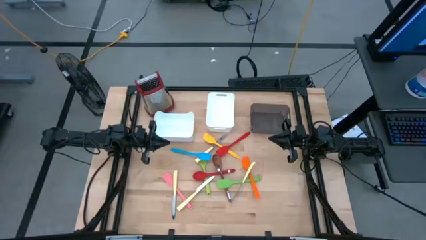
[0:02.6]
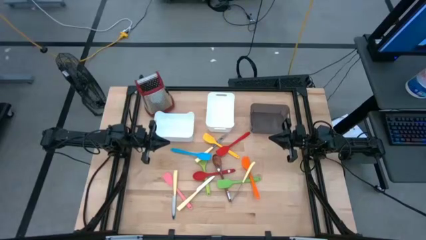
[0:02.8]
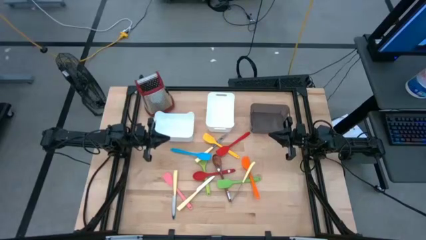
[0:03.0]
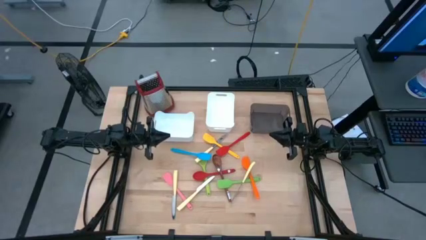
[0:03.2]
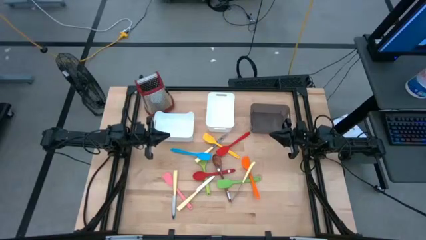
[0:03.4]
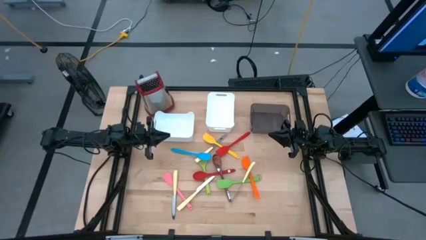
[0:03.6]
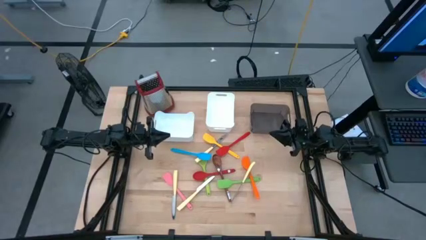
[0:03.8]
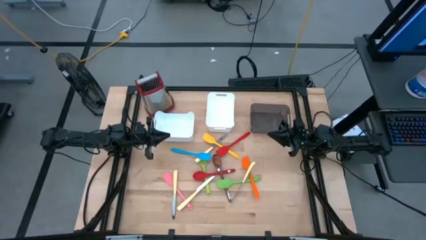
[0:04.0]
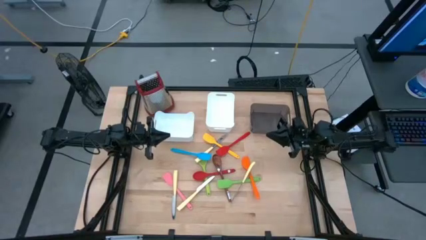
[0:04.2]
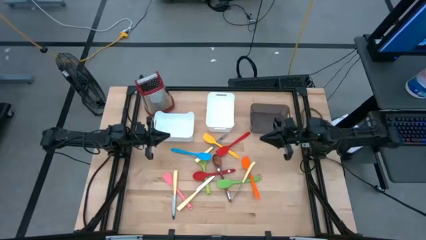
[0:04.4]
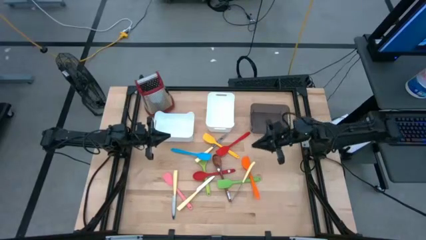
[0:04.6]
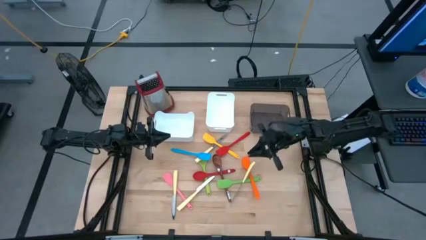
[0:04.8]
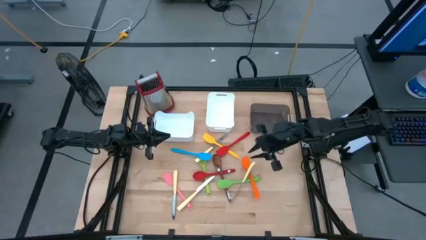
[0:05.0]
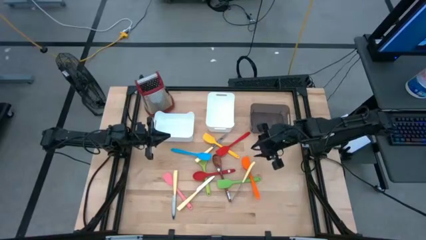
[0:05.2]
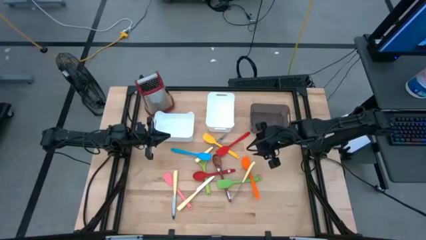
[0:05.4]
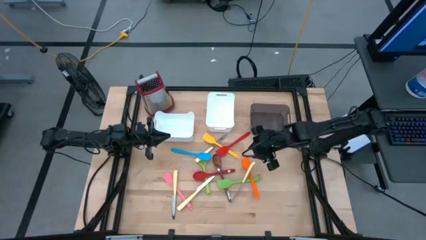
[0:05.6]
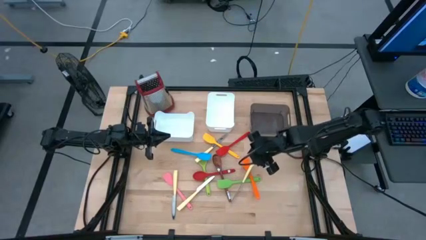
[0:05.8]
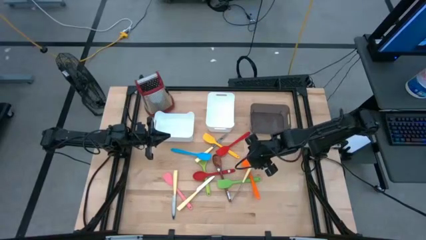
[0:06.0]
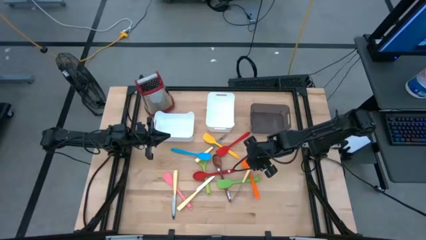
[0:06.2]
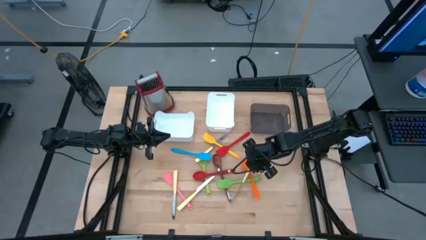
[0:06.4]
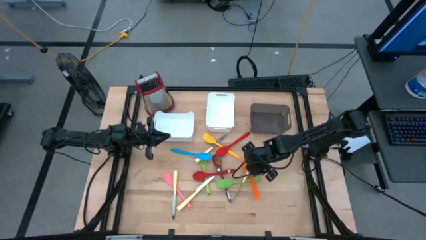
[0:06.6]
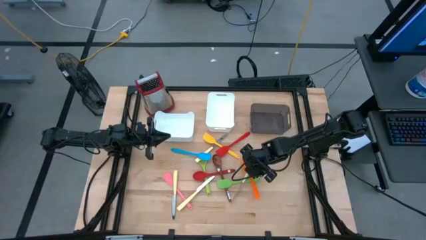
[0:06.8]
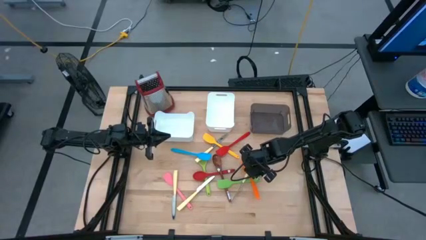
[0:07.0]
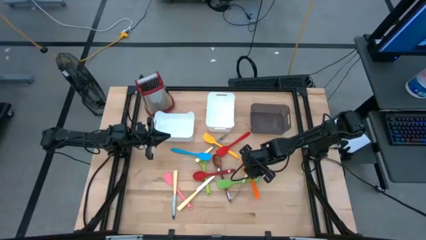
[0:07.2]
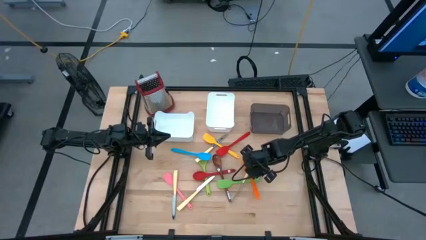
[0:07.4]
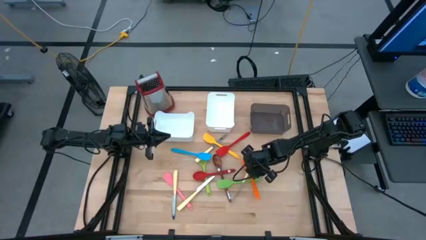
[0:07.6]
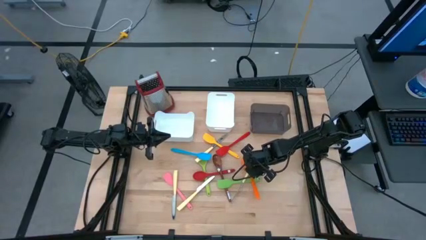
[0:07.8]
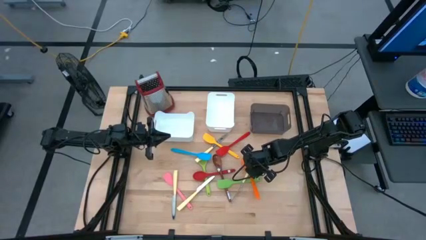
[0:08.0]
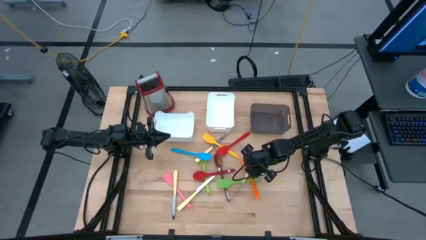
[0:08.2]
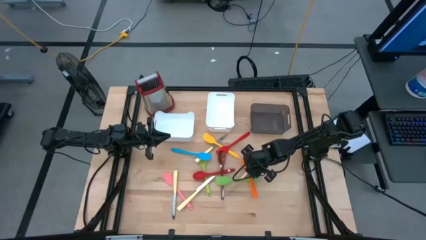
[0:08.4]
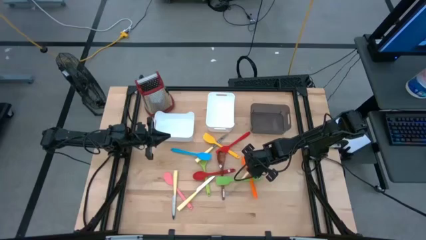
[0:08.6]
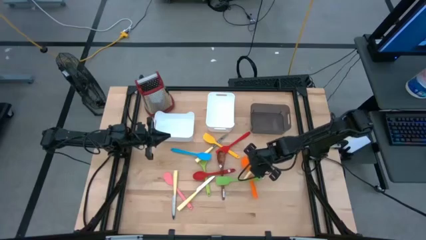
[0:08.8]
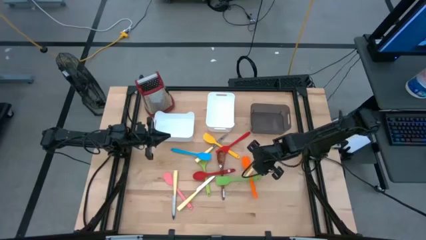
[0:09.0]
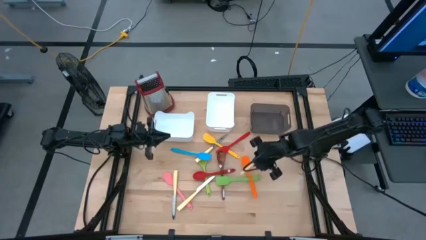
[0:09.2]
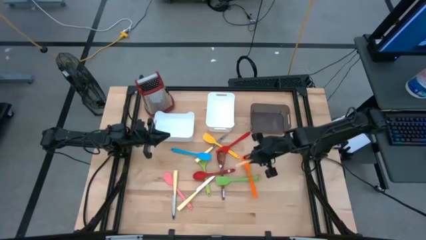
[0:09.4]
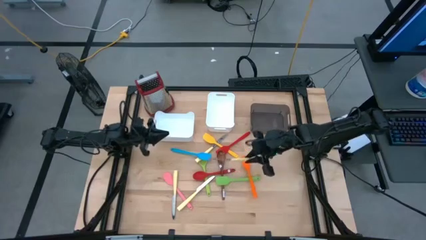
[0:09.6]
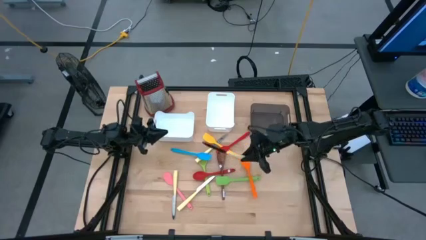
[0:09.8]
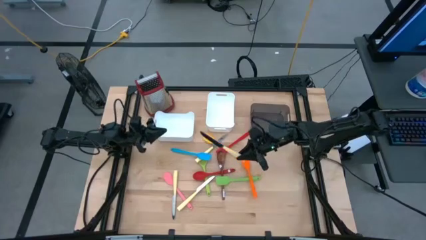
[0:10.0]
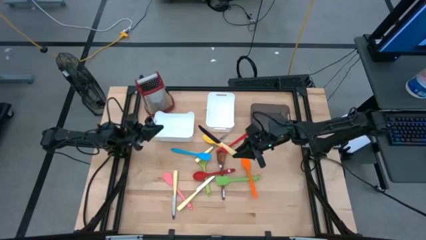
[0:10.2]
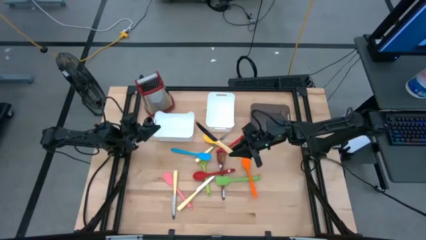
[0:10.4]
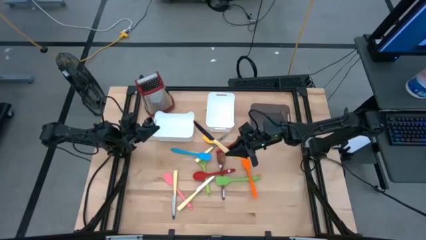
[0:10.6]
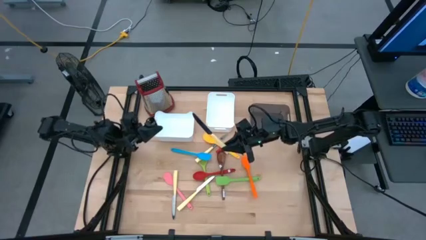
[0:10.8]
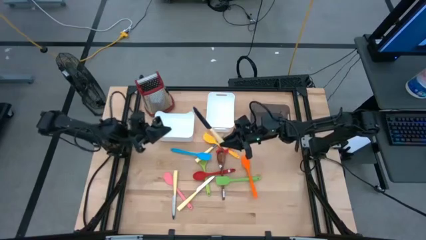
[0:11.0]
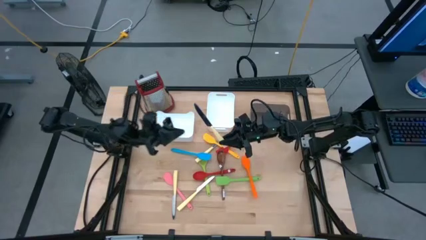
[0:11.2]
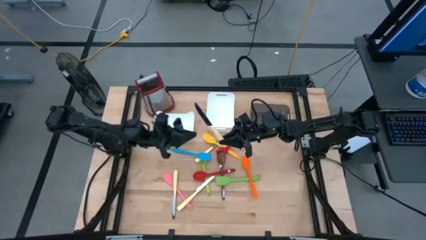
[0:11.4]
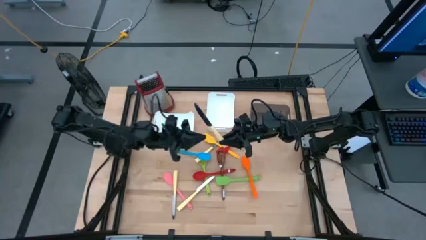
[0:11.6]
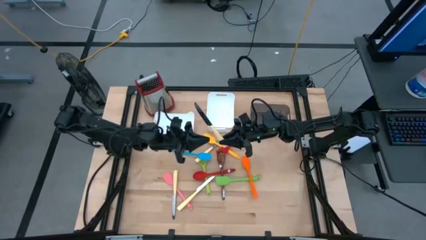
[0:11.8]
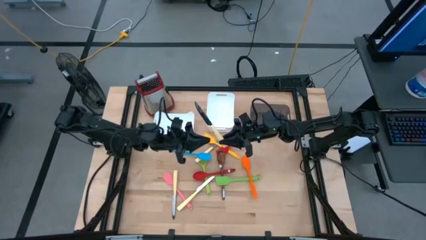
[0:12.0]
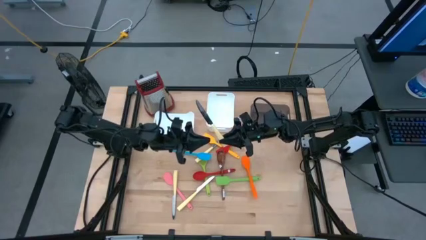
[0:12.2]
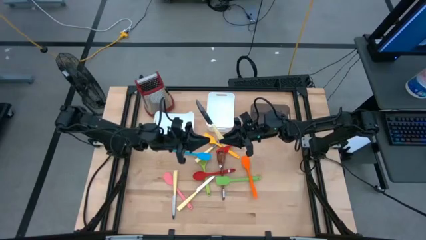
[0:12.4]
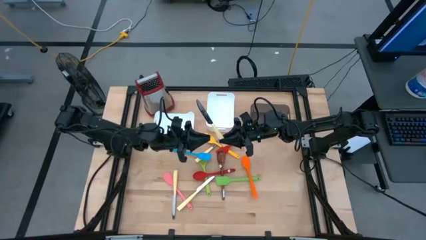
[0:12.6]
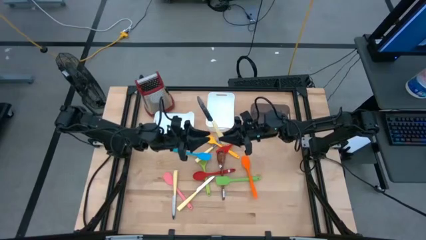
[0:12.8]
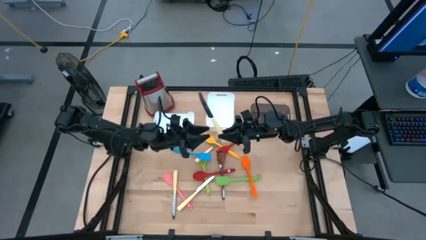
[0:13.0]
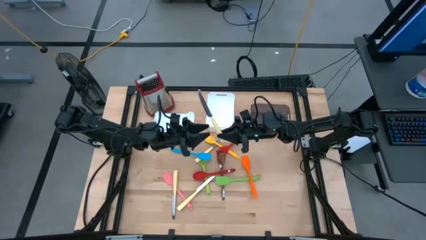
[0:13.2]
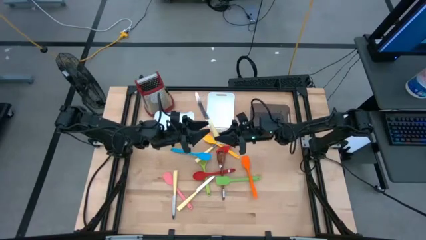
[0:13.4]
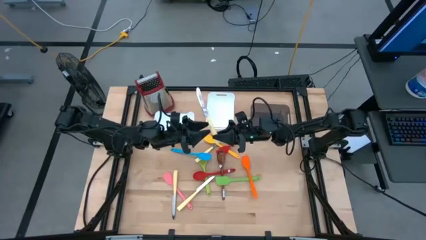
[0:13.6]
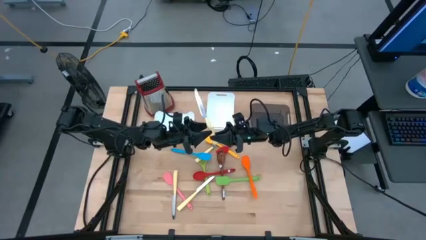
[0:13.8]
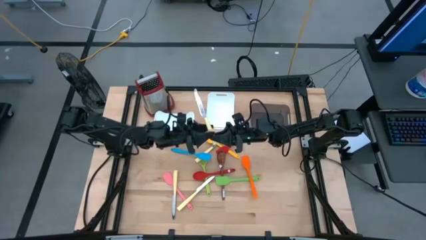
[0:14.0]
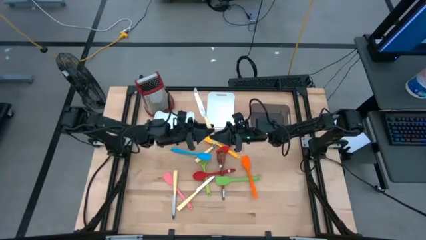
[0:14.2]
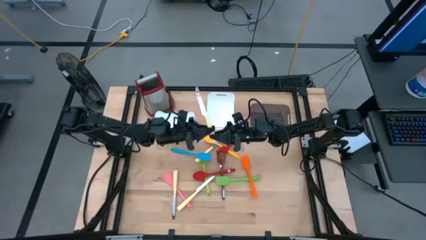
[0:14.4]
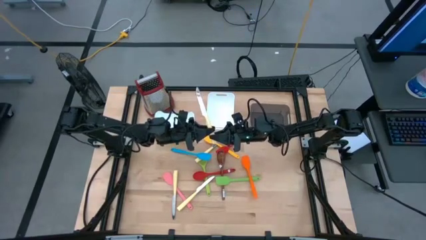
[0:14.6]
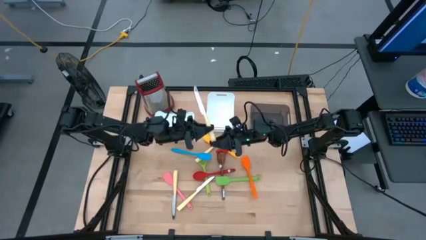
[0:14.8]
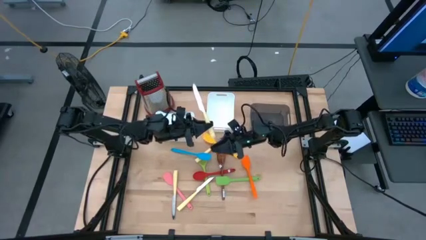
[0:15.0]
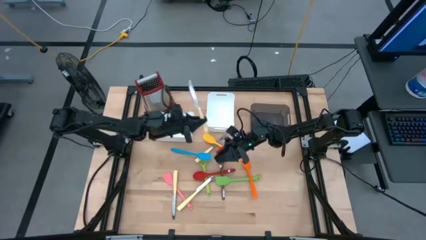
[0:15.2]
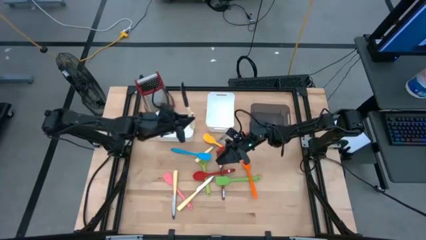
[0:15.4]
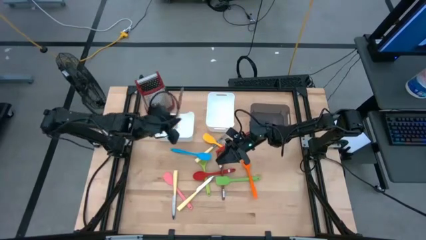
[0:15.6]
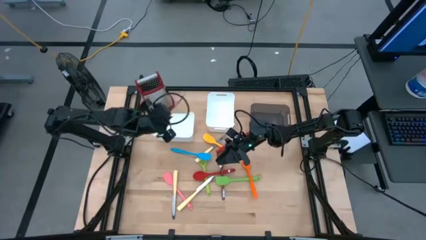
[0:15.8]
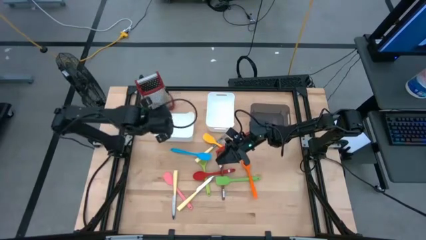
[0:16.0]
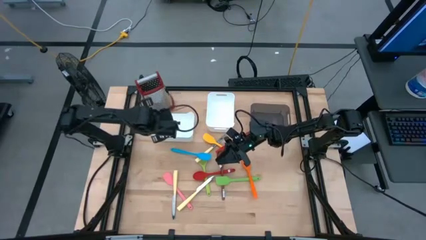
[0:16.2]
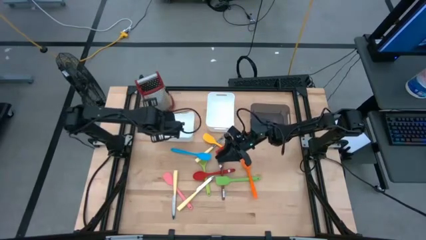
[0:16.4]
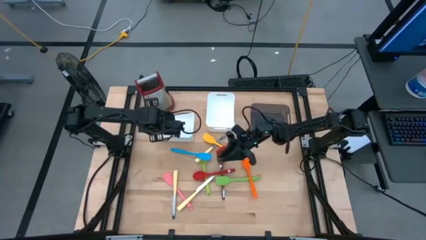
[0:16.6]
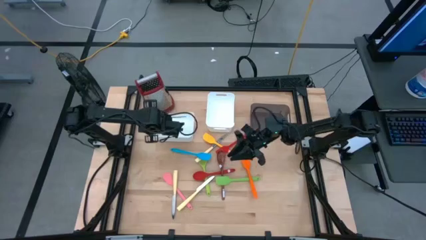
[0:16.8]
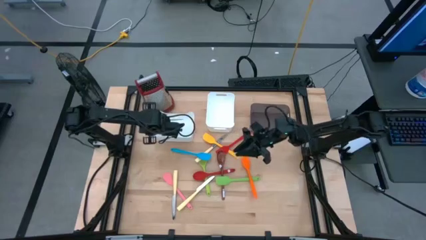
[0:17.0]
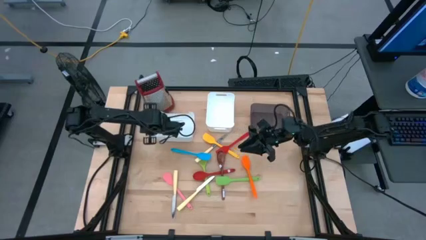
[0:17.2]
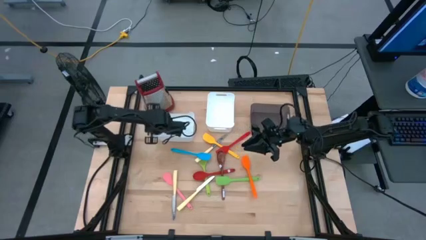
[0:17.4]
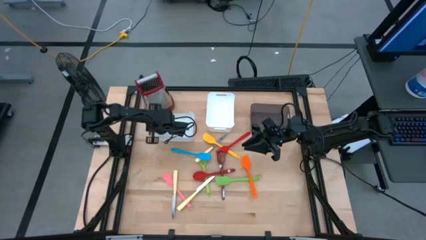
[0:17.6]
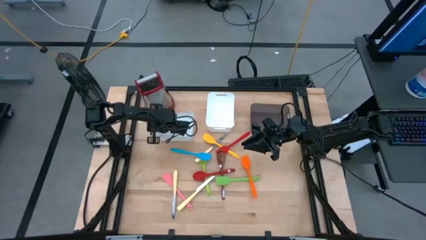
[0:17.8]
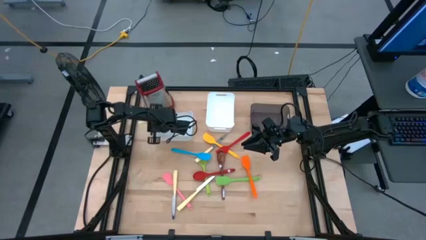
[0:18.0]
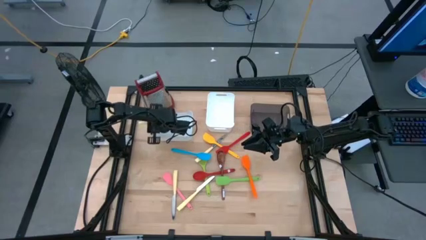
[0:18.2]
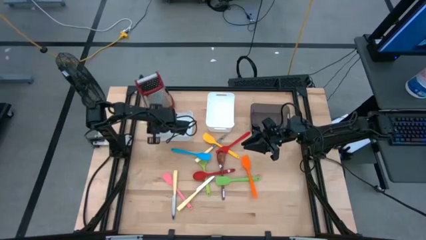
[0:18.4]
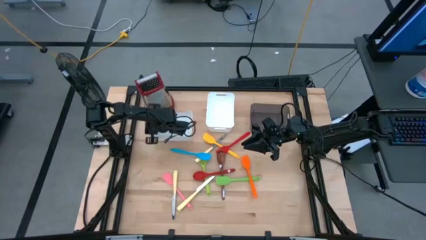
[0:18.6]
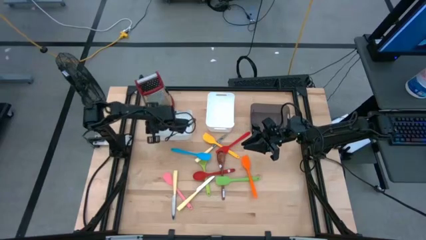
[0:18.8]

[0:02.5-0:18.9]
Task: Pick & Place Kitchen Items
Put the yellow knife into the left white bin
